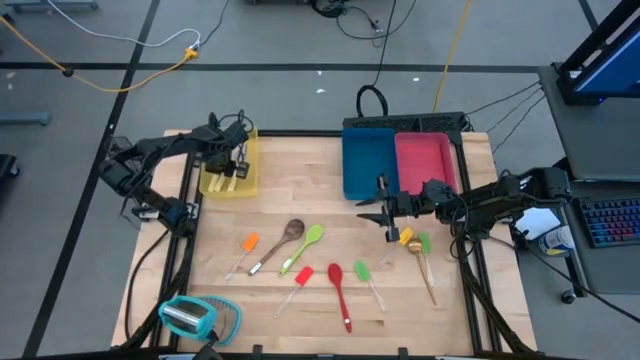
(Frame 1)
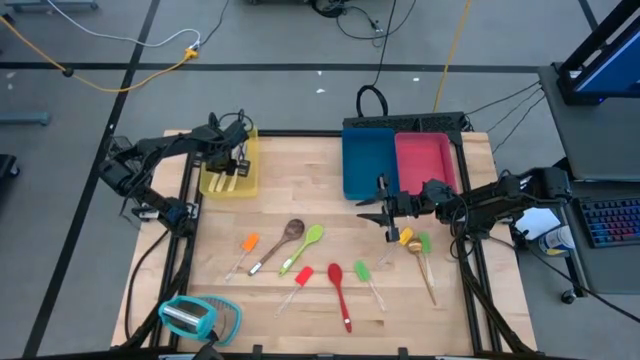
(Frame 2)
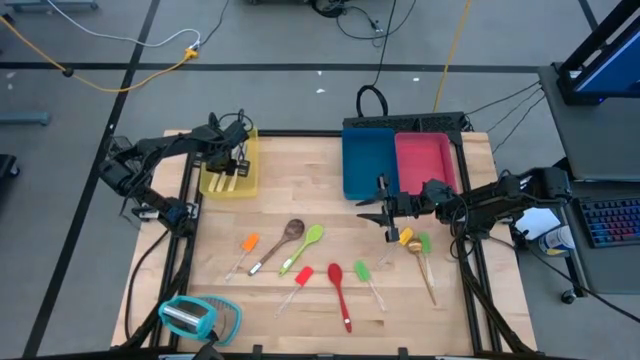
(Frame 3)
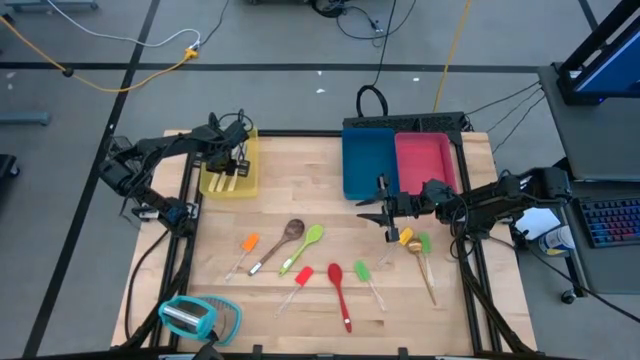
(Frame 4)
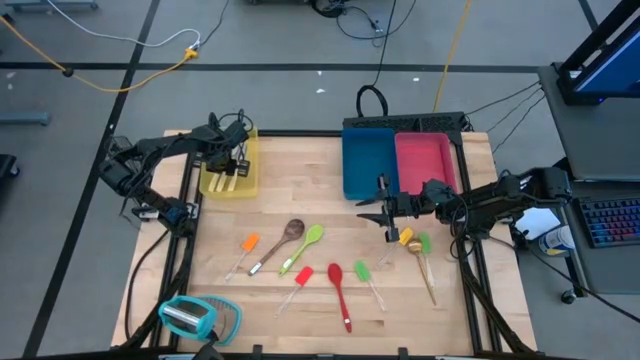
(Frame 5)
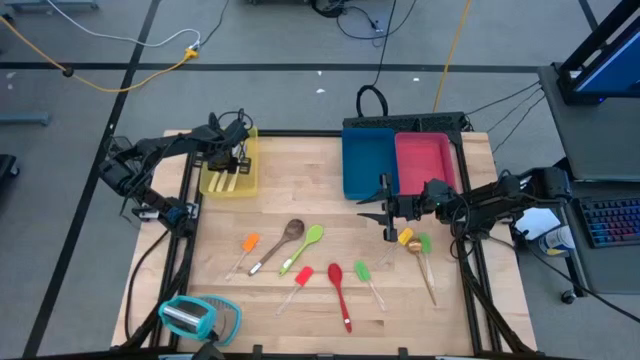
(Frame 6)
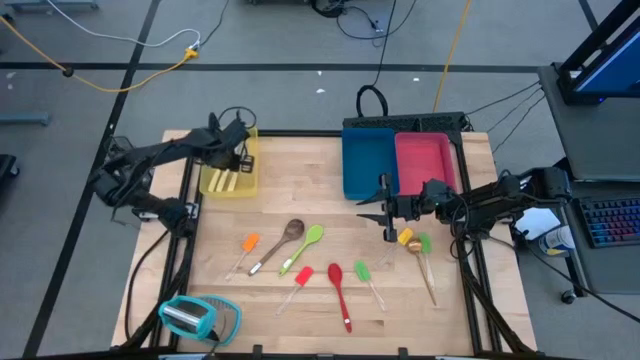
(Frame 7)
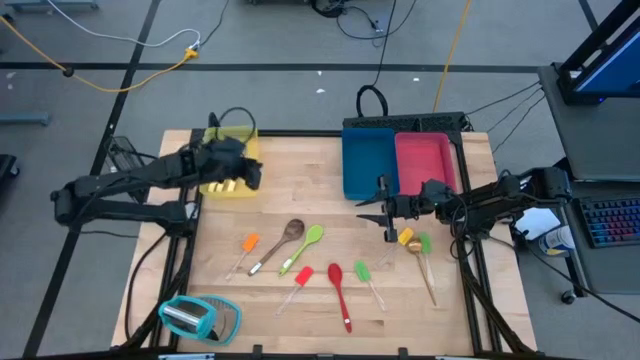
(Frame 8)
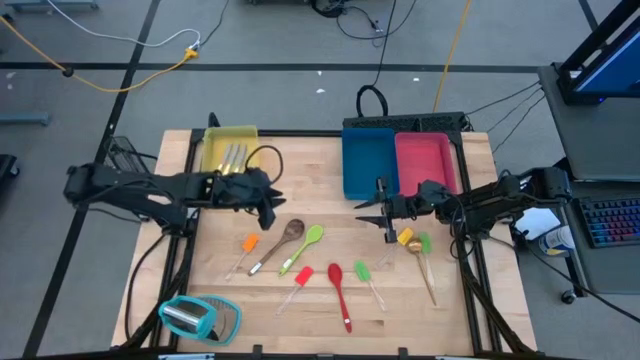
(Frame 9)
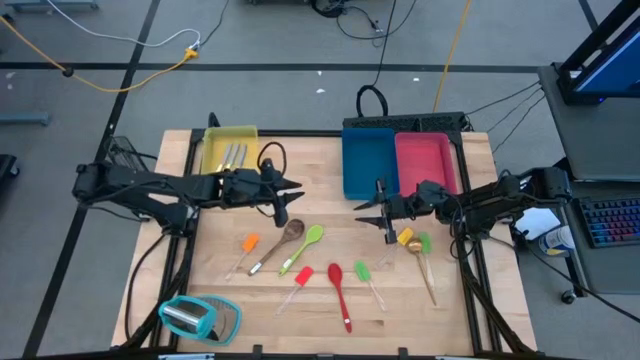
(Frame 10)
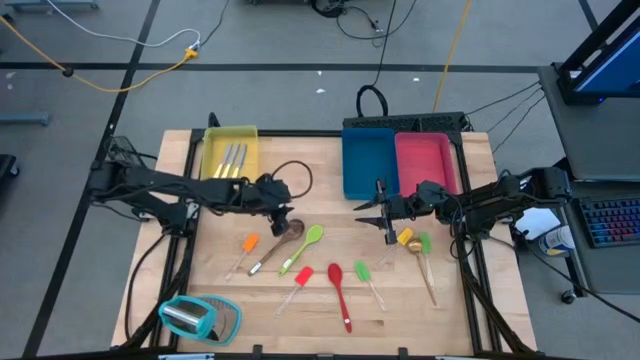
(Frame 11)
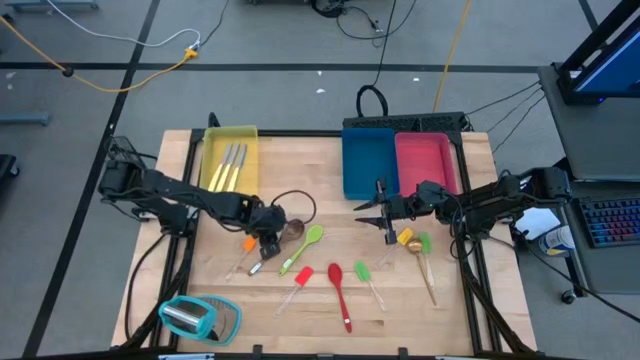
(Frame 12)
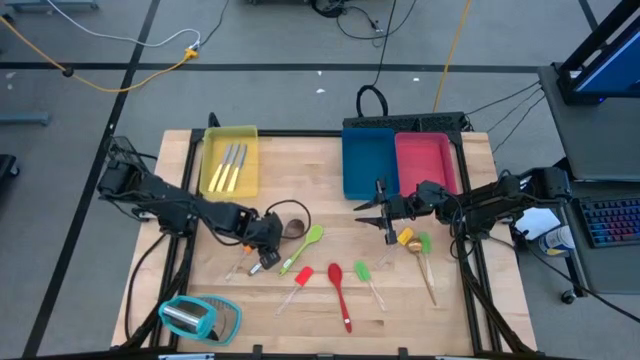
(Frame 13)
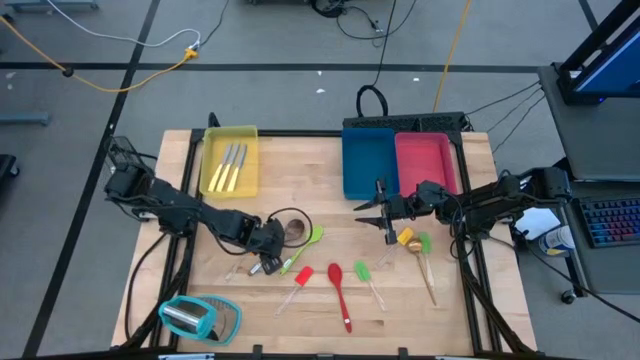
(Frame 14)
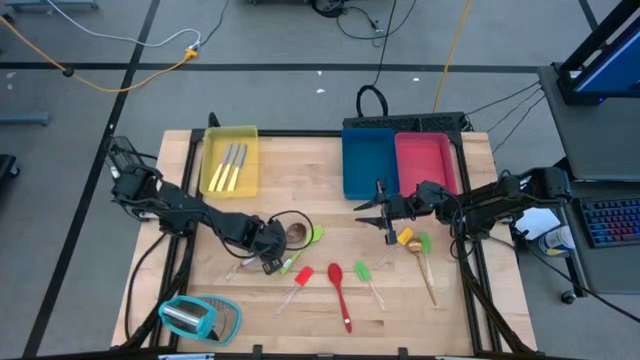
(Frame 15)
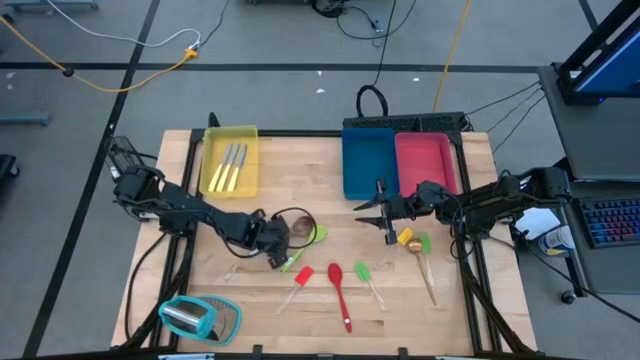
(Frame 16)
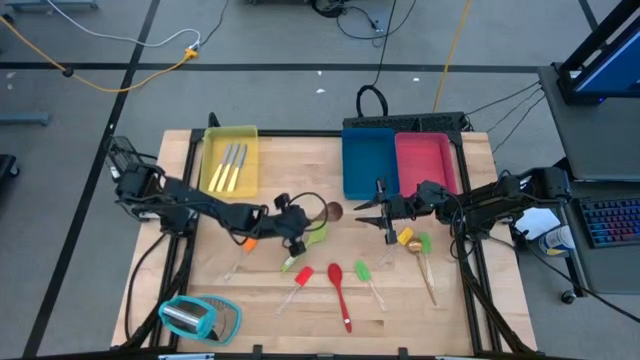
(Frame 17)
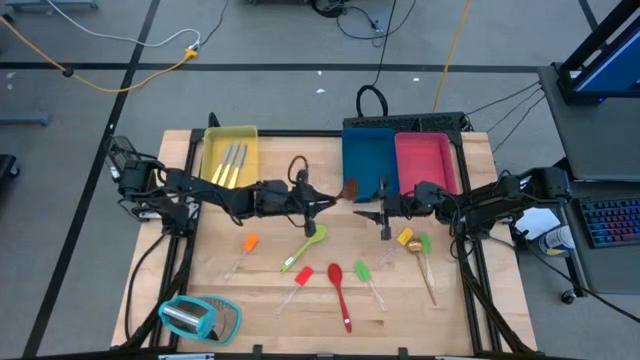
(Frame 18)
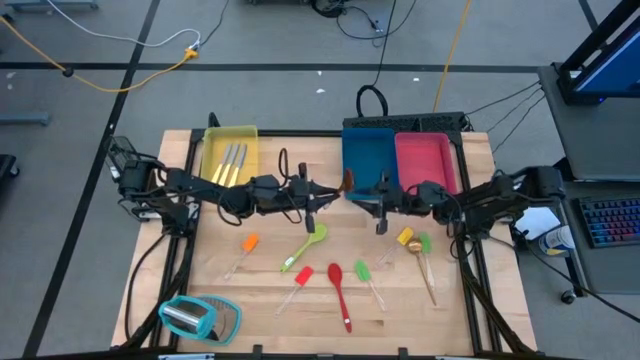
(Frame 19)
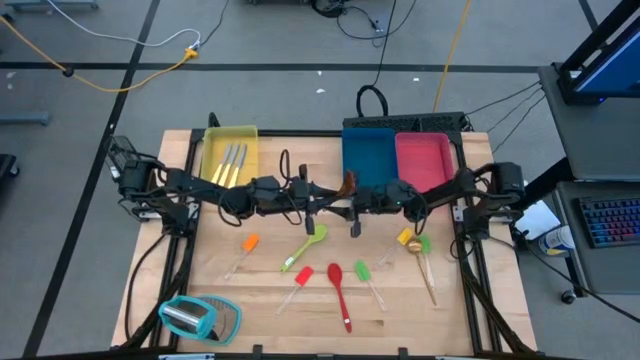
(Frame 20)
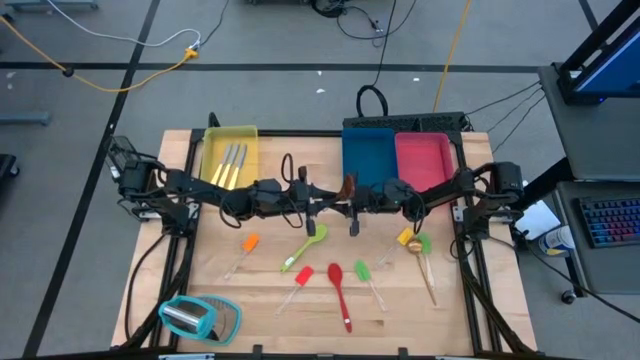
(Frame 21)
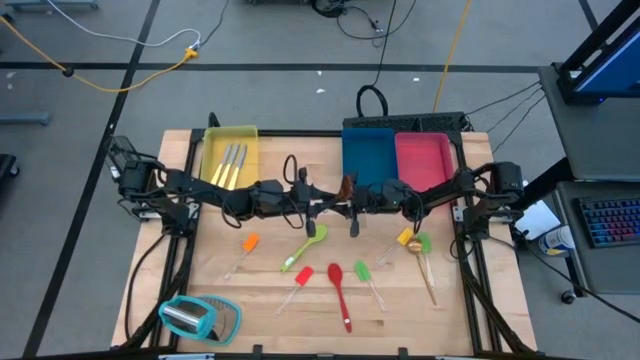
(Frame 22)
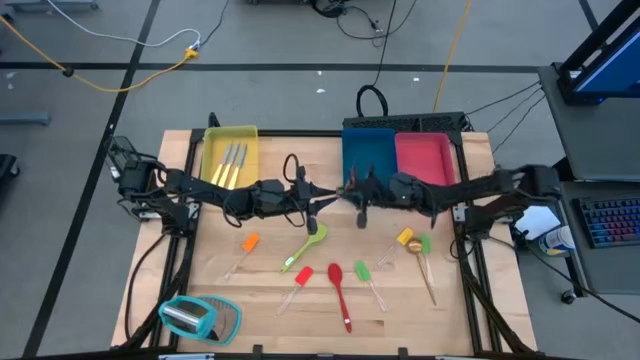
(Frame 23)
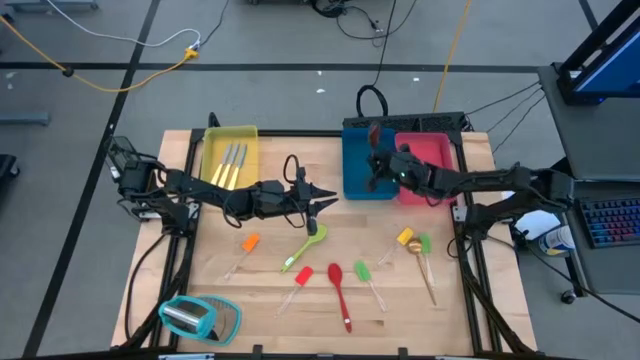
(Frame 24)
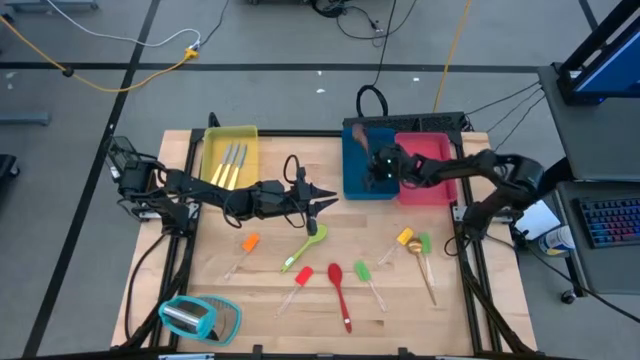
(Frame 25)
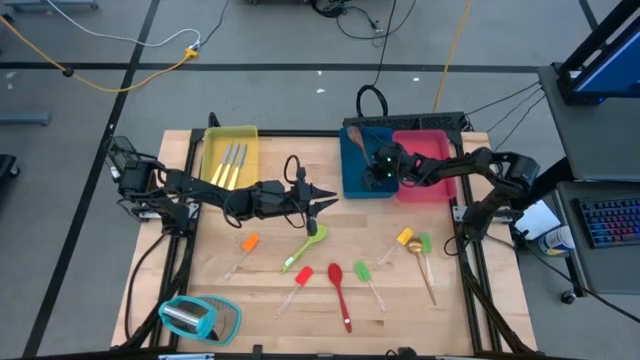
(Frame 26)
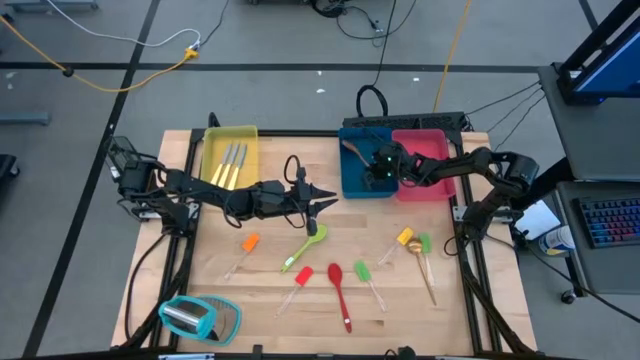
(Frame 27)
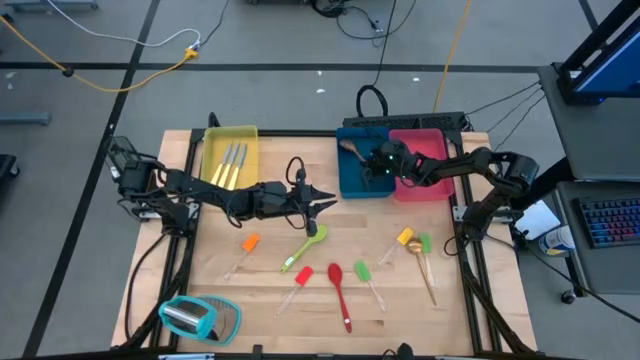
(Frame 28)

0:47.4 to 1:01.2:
Task: Pick & Place Kitchen Items
Put the brown serving spoon into the blue bin
